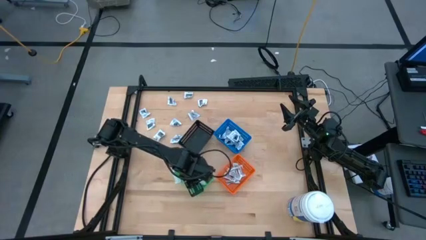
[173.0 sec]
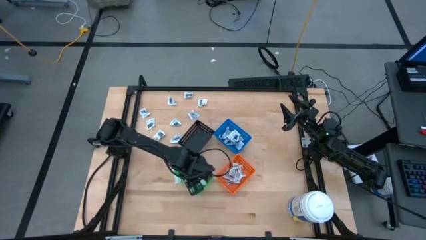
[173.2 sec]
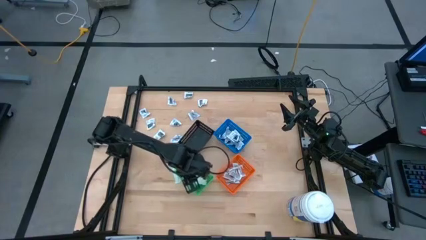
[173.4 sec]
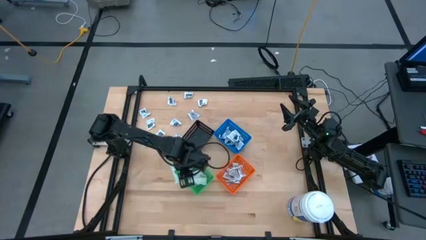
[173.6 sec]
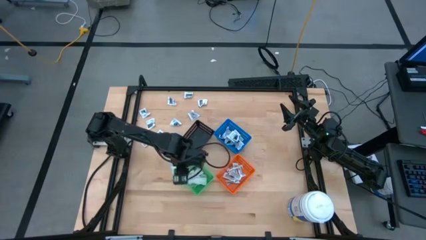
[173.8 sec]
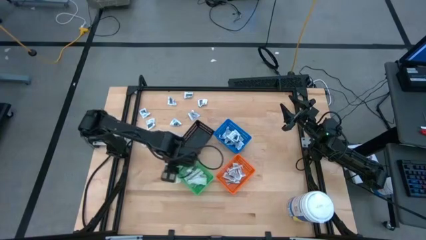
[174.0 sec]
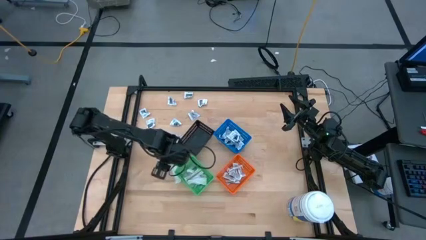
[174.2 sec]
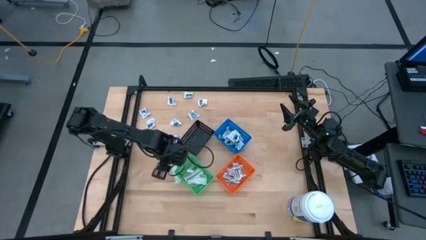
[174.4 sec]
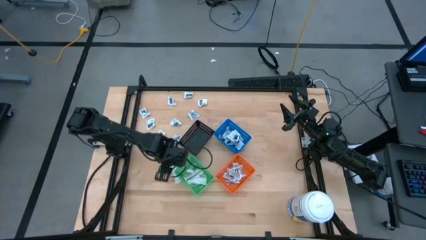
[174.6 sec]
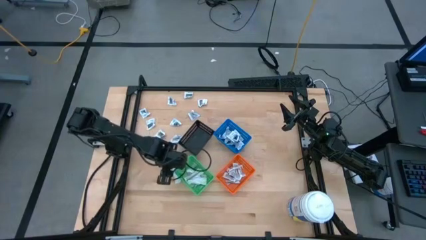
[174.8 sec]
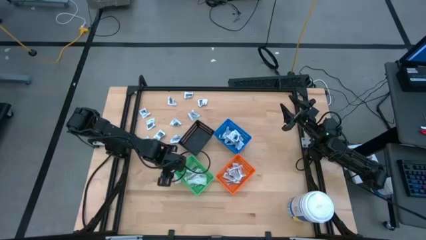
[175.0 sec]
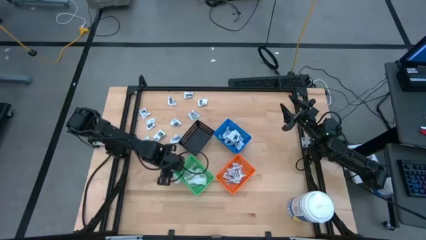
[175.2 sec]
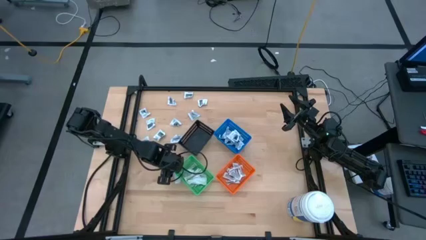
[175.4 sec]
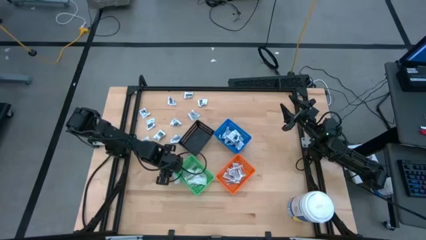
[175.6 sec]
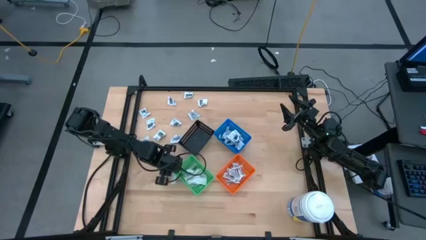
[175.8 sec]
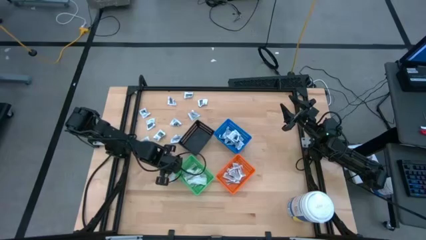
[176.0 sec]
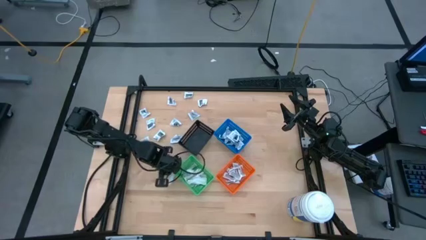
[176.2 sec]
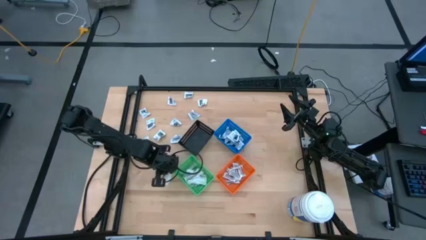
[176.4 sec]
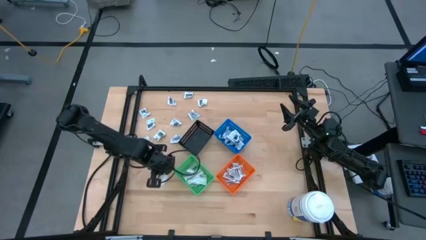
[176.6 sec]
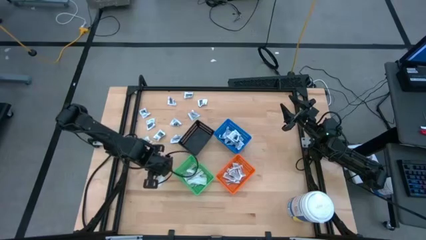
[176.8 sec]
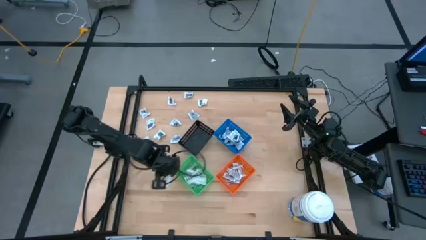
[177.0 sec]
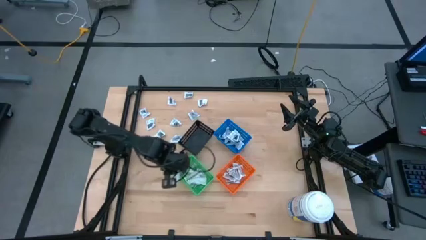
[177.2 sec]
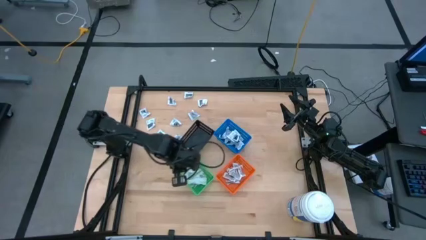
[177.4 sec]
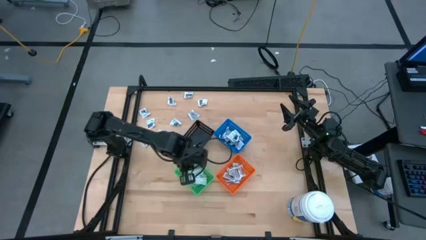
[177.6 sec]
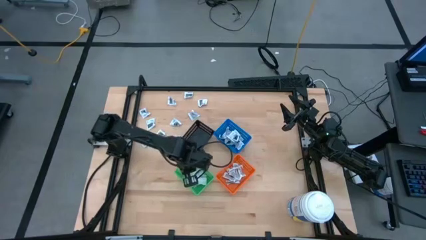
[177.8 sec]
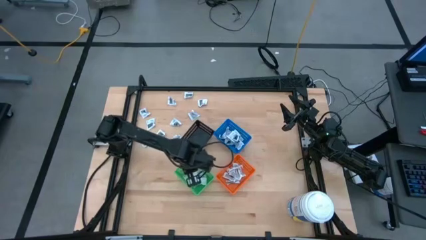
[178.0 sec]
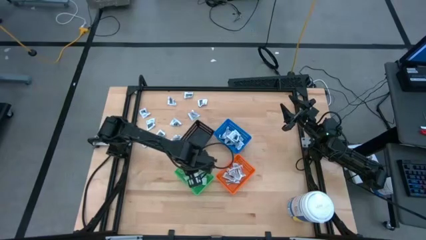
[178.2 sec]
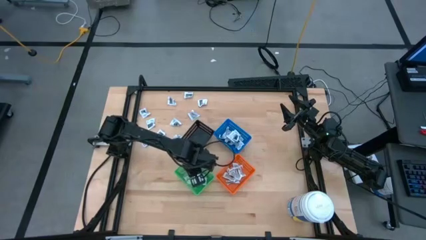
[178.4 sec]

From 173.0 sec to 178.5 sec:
Task: Pick & Place First Aid Supplies
Put the green bandage into the green bin

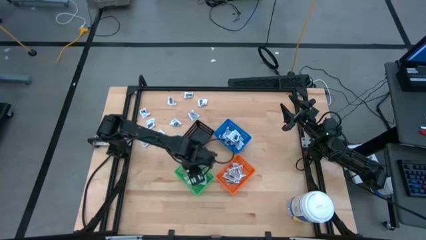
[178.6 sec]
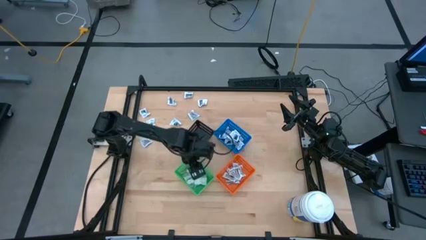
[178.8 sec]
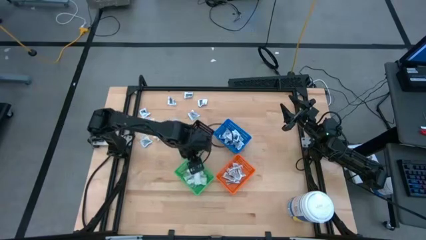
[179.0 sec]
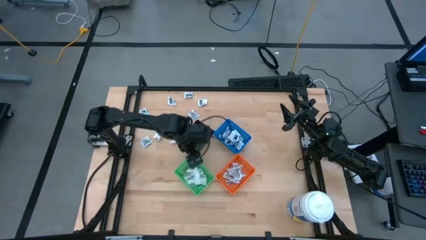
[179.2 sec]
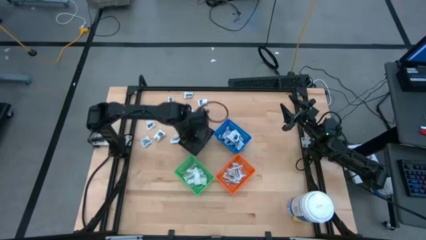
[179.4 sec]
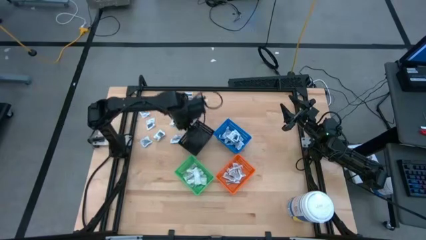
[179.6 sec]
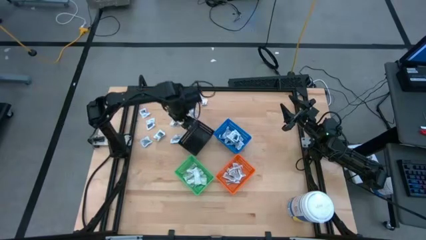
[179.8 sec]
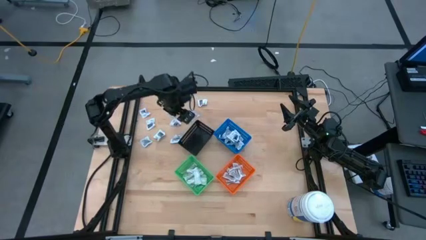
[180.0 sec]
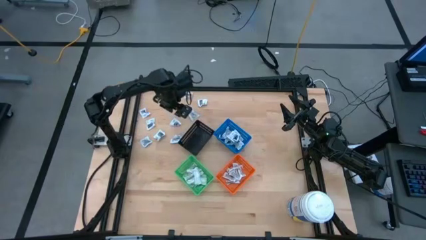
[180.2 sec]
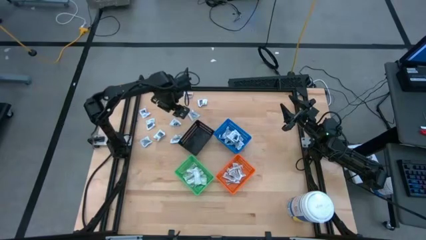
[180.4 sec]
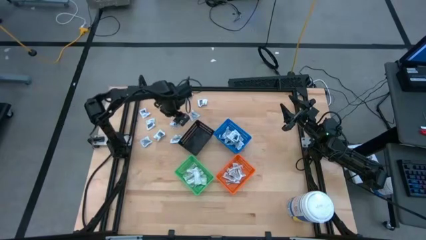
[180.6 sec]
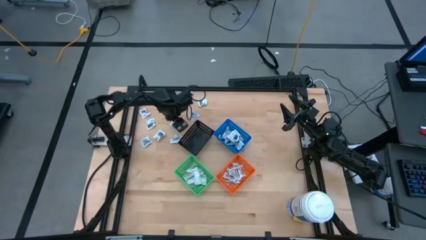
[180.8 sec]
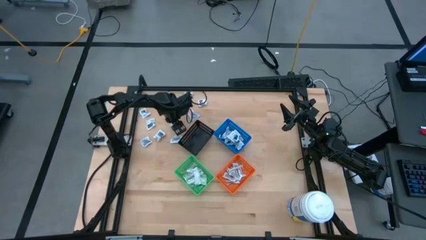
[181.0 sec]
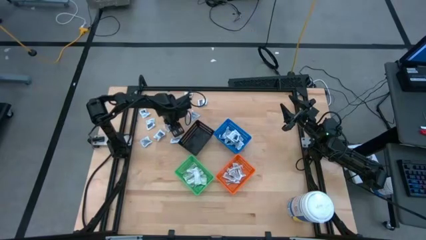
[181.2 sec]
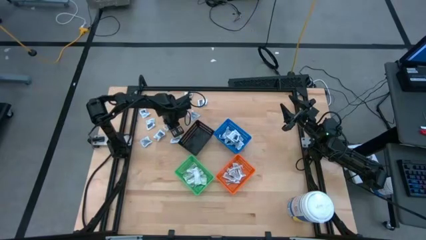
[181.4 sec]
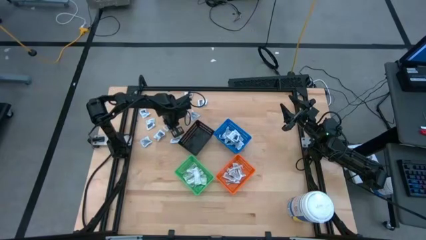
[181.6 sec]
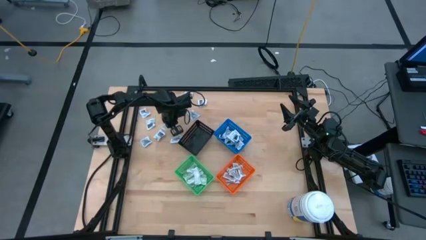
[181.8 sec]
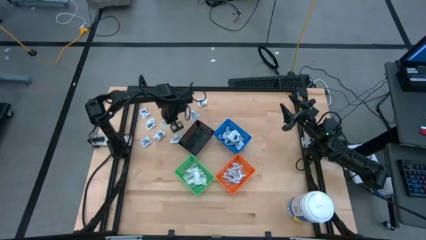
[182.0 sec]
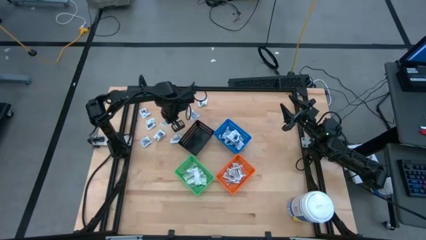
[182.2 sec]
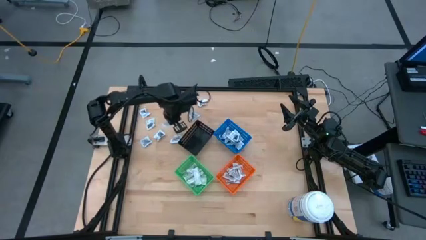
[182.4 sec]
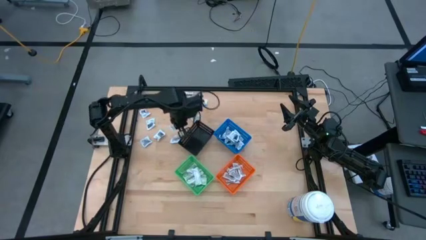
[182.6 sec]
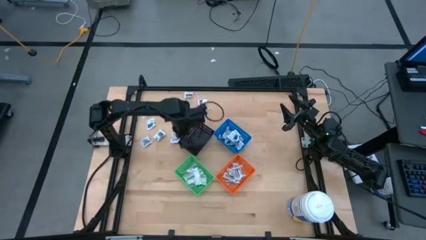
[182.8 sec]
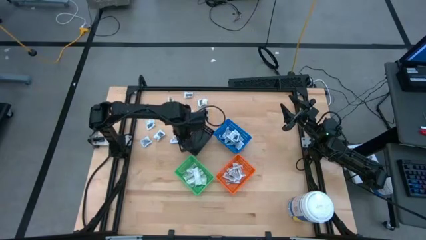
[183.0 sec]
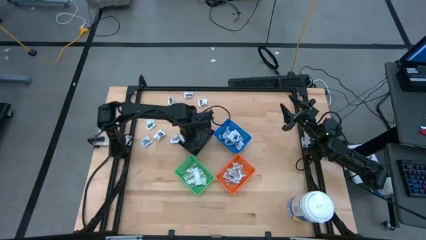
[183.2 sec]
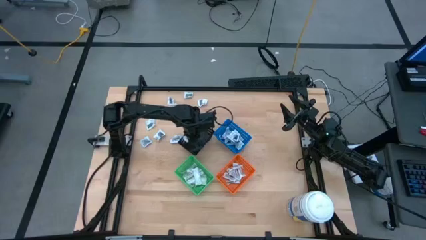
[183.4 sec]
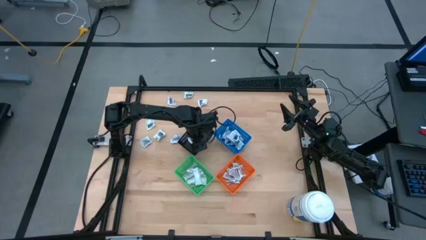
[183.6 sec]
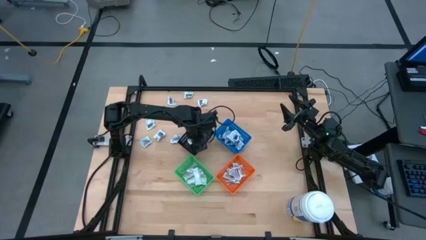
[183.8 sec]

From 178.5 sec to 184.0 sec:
Put the black towelette pack into the black bin

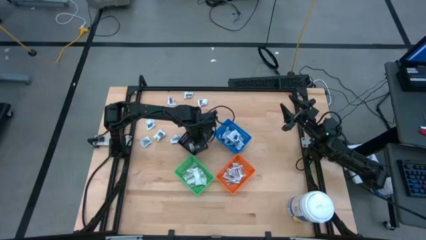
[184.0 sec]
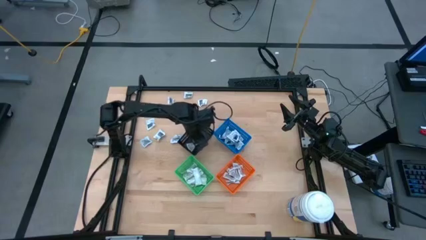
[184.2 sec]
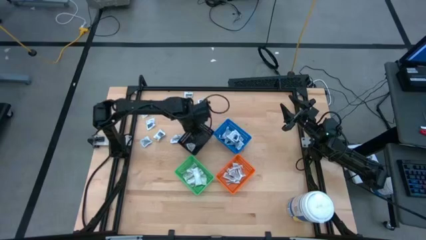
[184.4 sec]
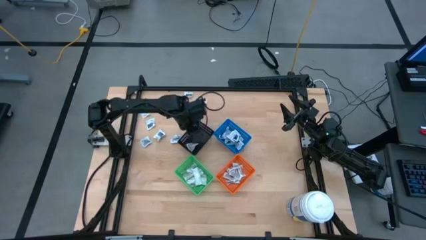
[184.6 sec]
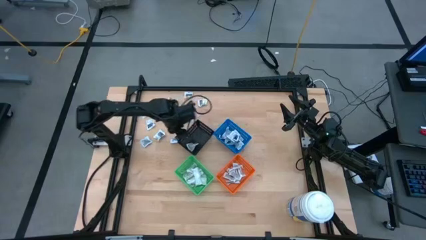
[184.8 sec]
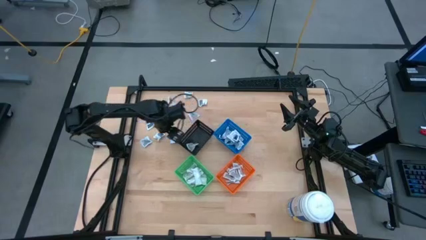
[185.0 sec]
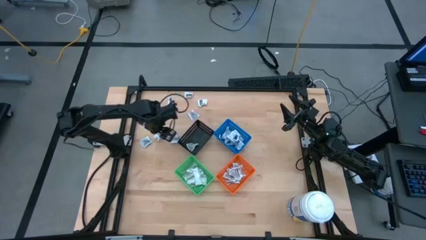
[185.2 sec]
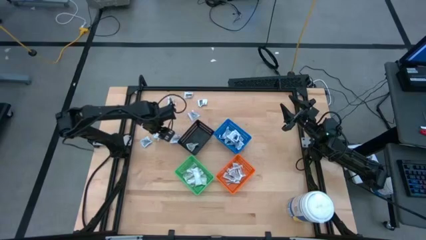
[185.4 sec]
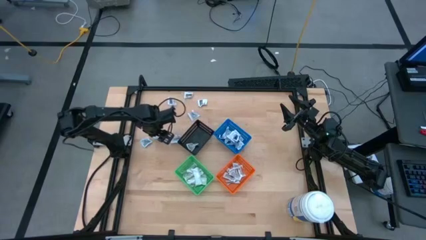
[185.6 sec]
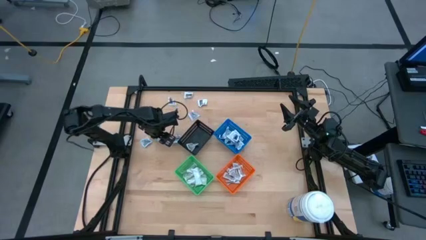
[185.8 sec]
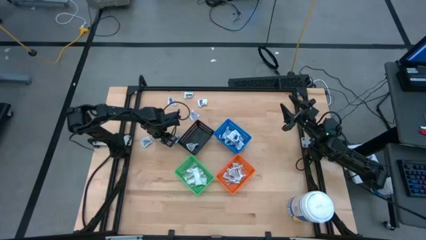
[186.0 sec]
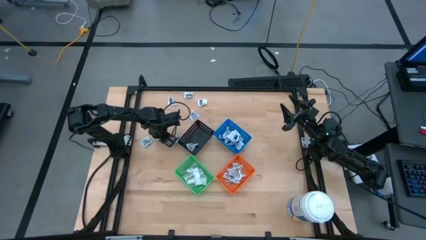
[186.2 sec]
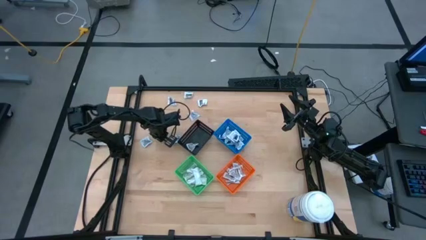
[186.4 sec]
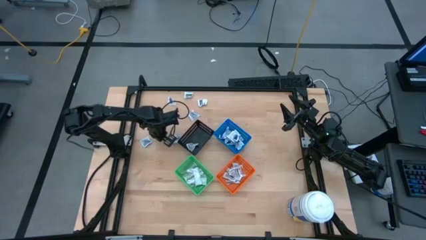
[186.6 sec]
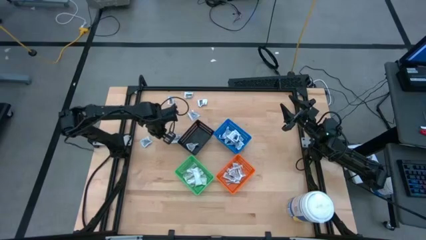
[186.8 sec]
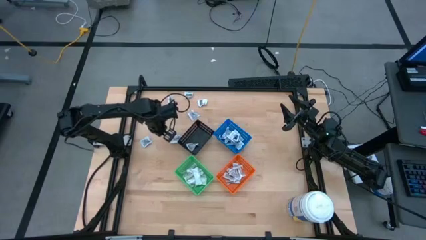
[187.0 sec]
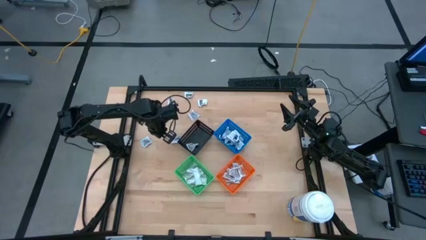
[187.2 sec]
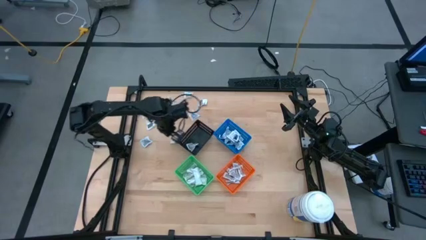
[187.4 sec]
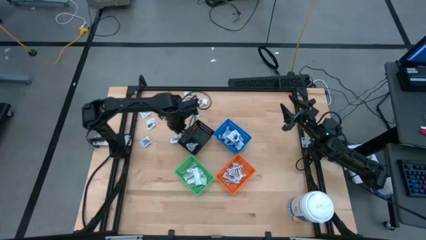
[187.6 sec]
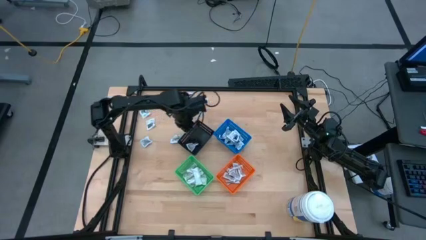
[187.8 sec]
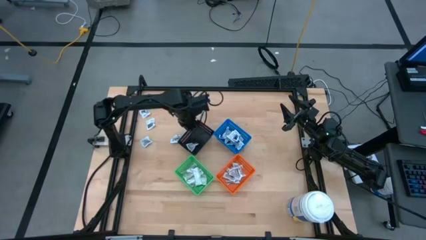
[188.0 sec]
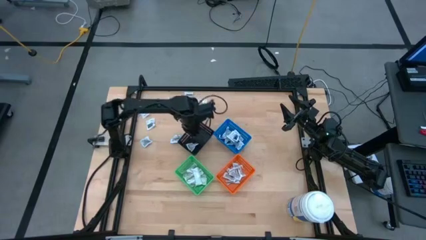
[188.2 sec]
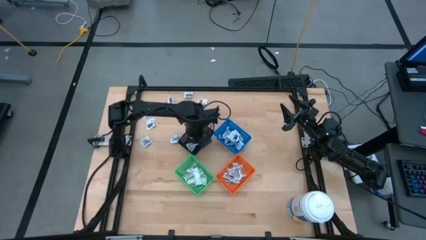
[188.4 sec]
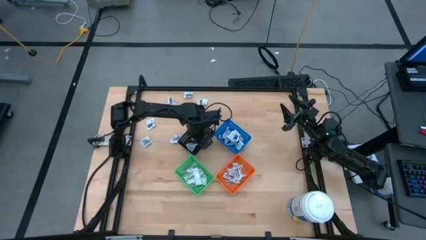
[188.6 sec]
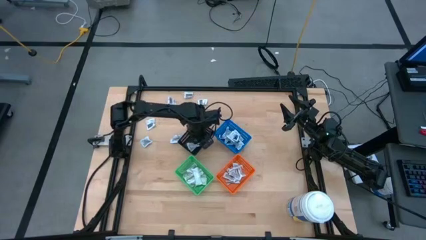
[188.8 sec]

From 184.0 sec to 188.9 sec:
Put the black towelette pack into the black bin

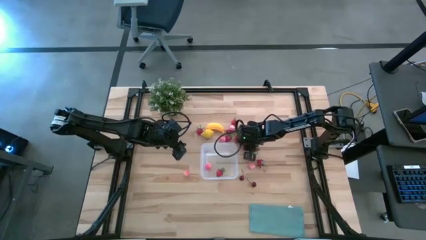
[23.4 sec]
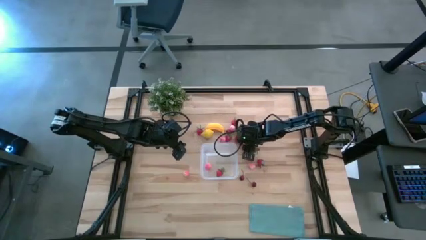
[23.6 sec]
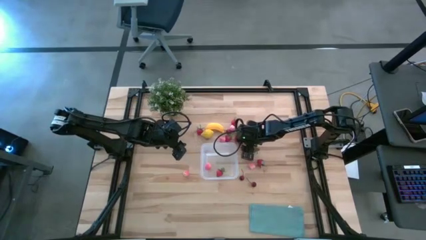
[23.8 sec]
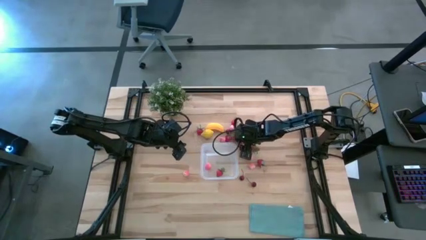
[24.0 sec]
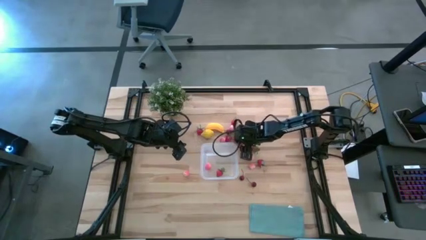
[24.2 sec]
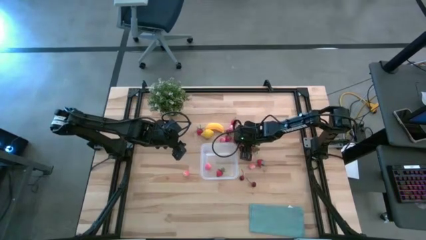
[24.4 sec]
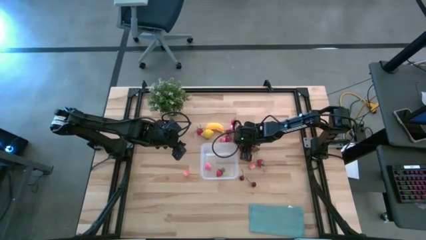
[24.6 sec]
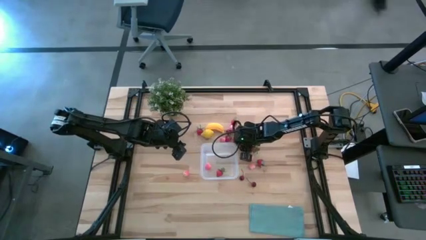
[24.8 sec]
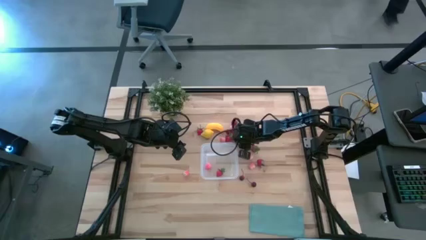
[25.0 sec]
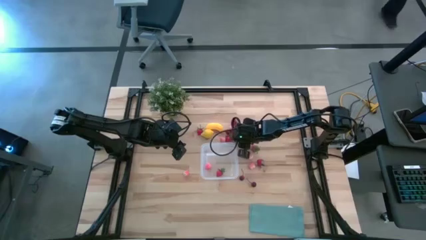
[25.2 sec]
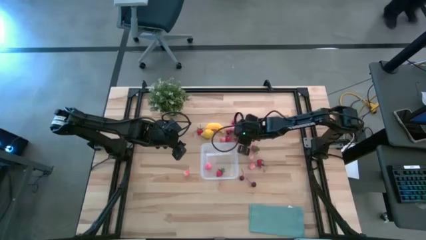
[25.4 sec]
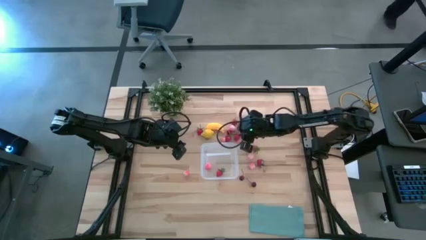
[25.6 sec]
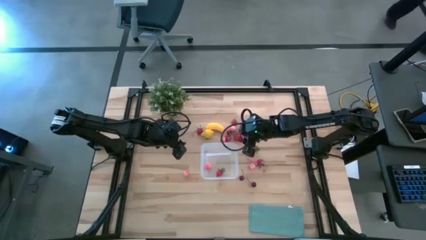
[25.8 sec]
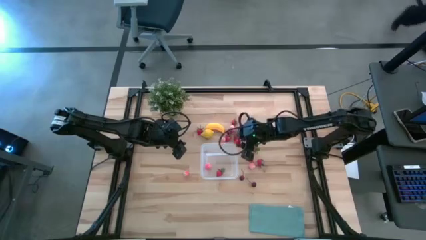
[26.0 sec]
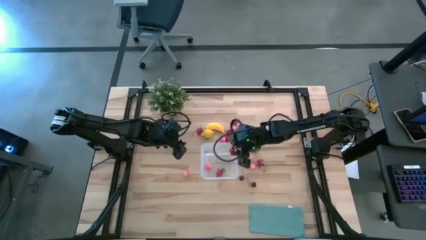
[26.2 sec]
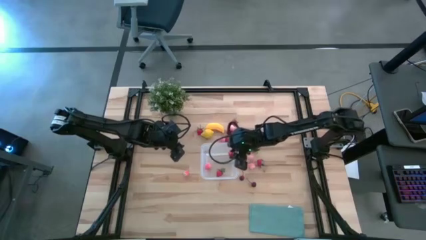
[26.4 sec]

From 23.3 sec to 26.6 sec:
Task: Pick and placing Produce into tupperware
Put the red cherry into the transparent container
